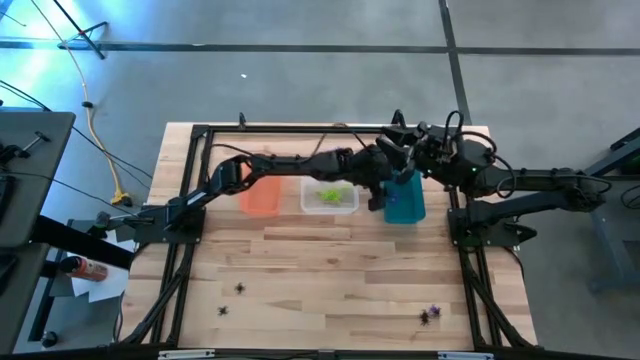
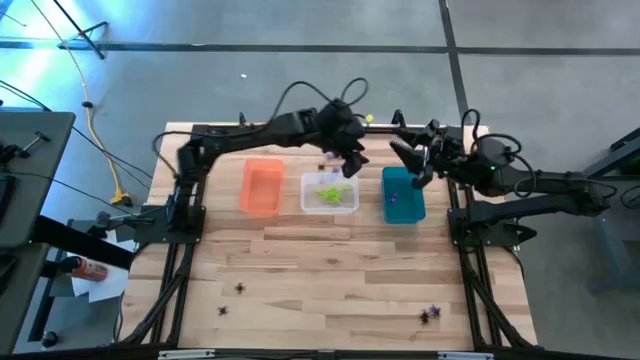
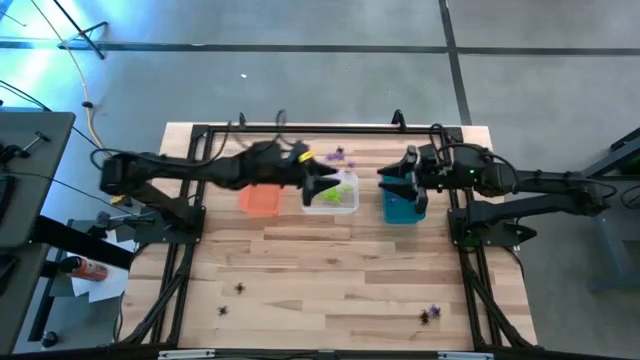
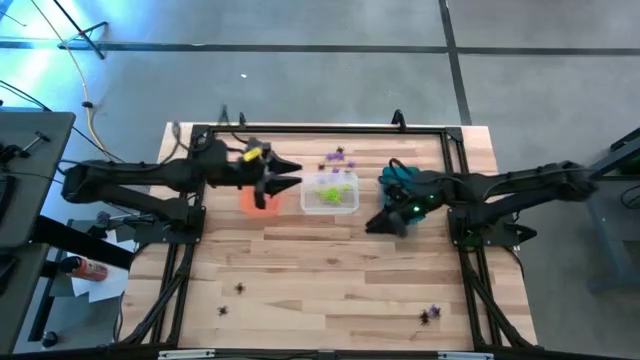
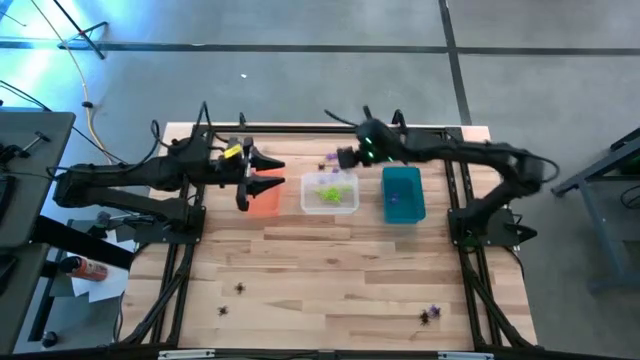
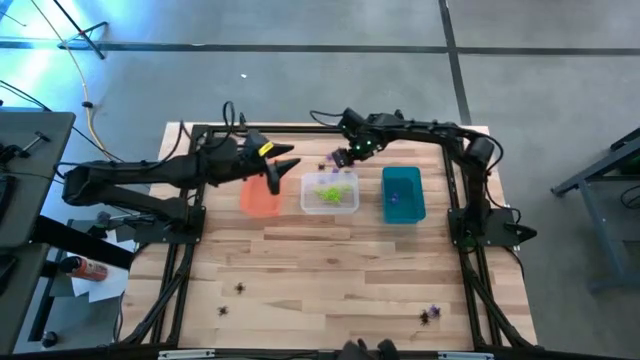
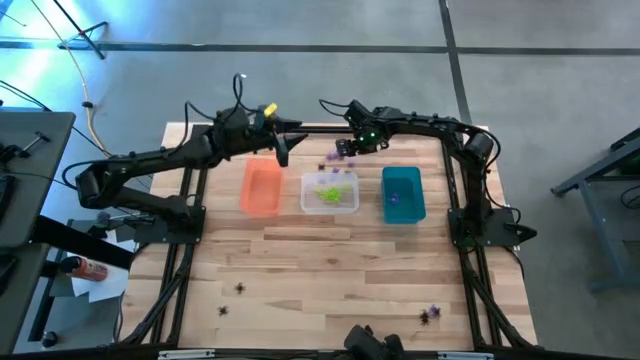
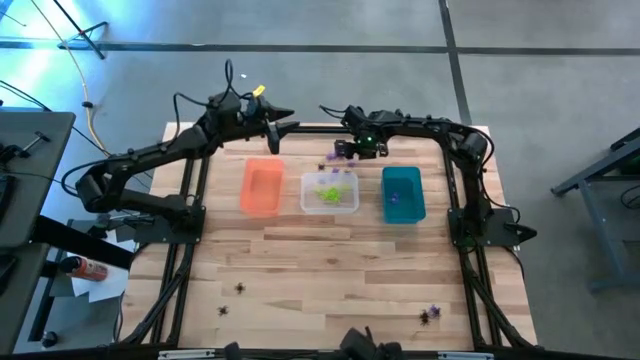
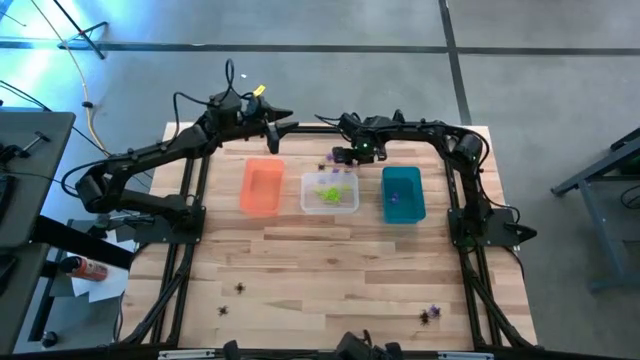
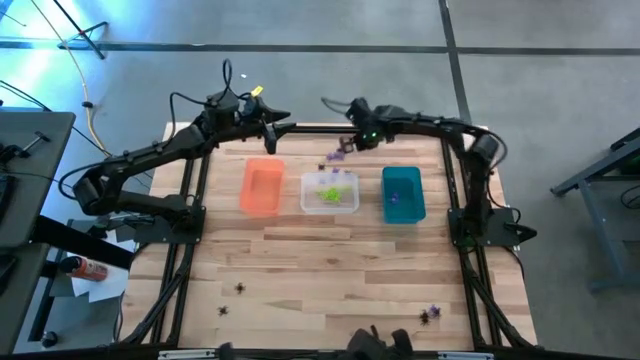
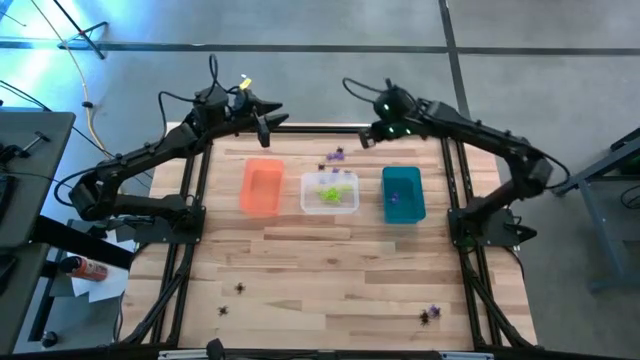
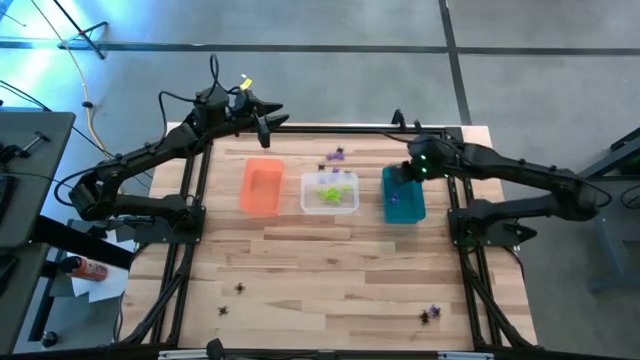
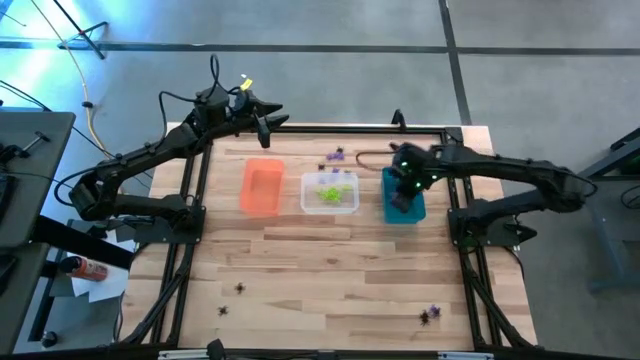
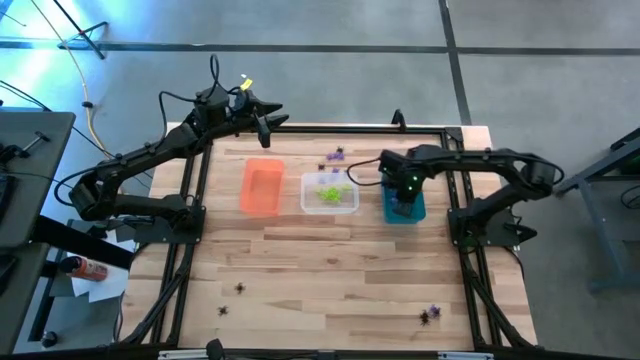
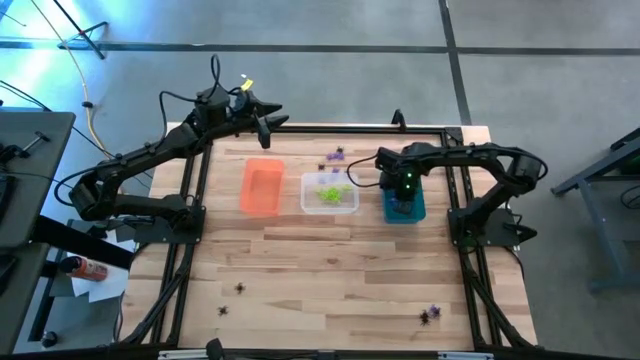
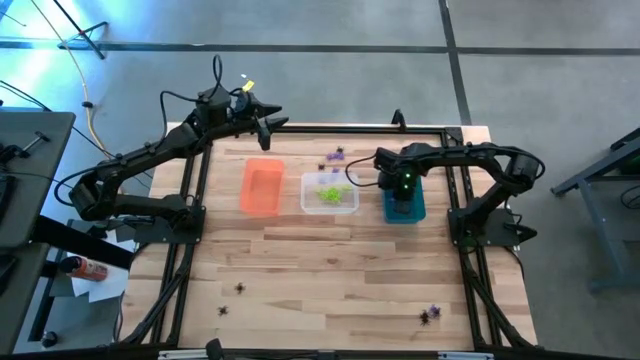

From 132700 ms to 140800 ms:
Task: Sort Halloween decoration
Put the purple spider toy into the blue bin

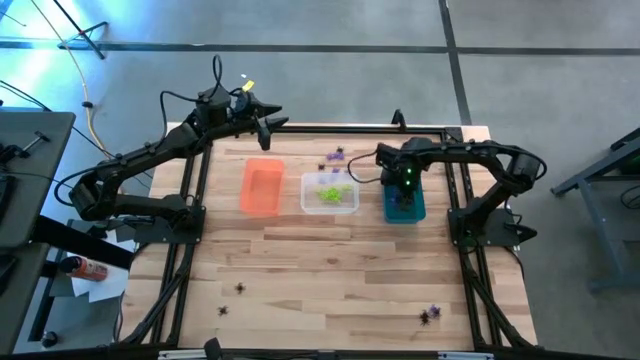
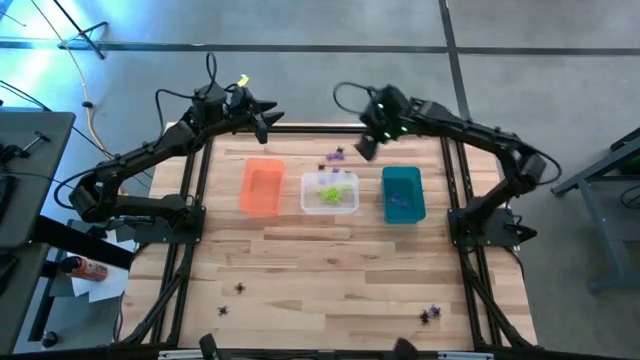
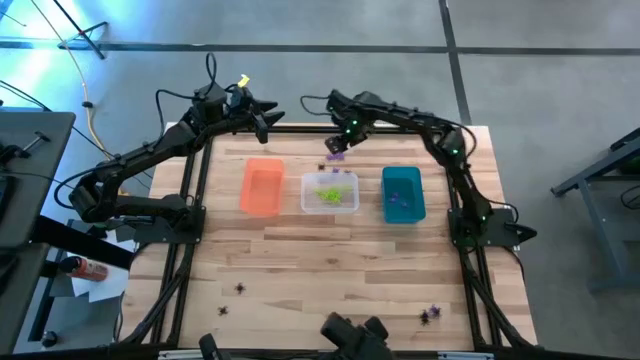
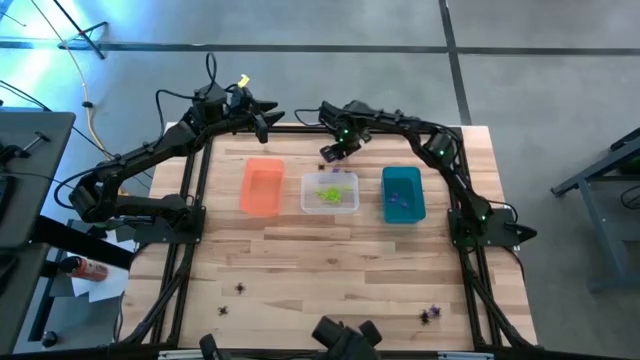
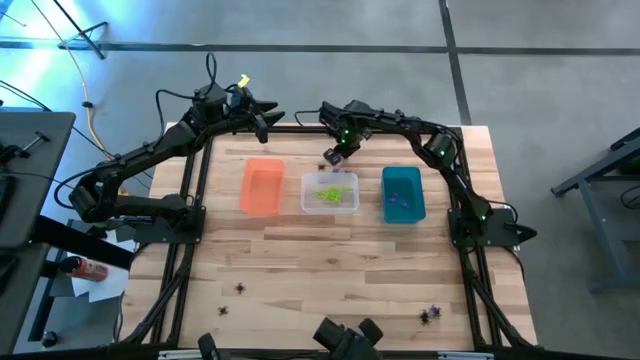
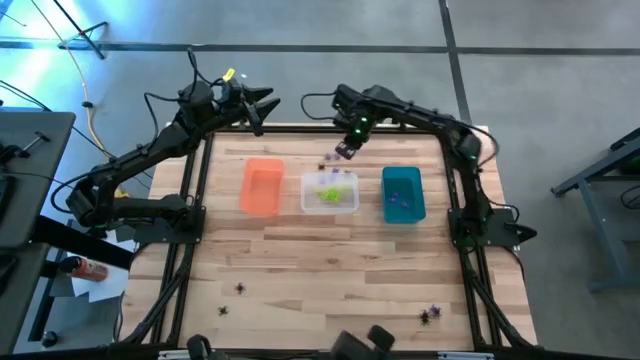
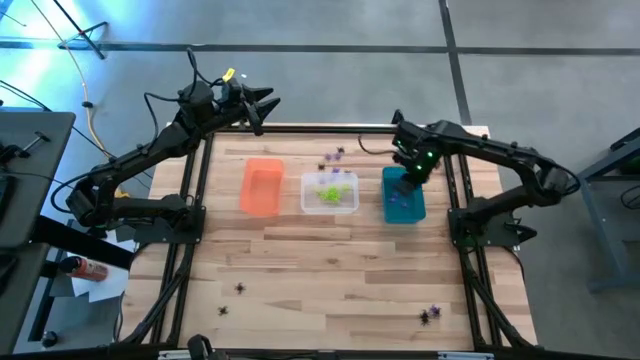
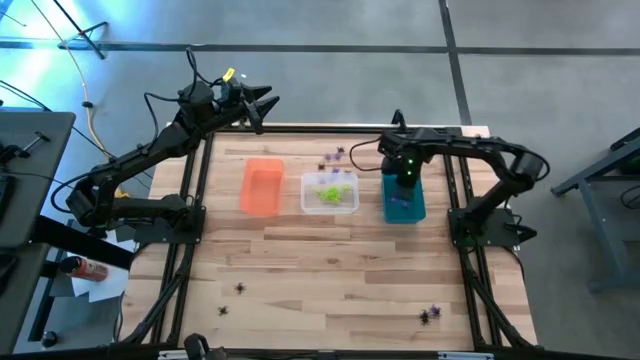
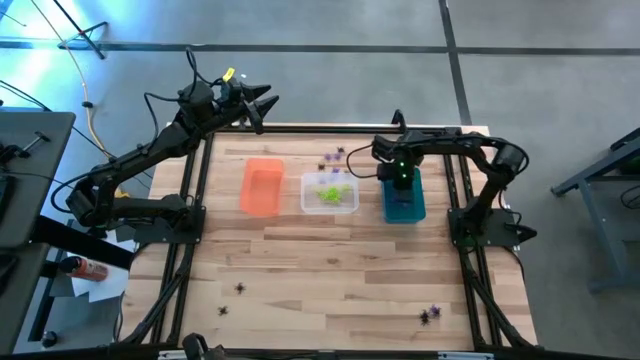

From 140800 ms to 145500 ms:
Put the purple spider toy into the blue bin

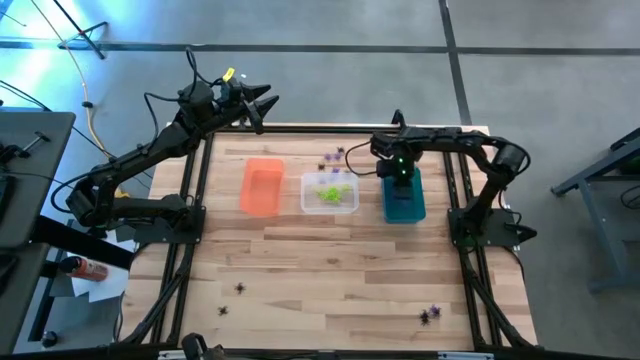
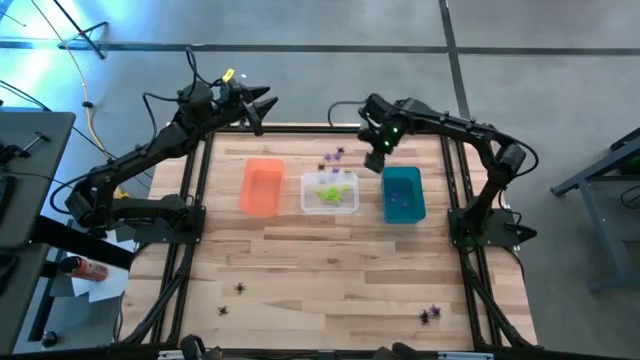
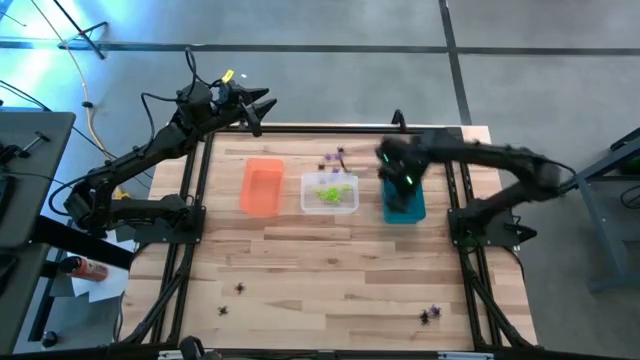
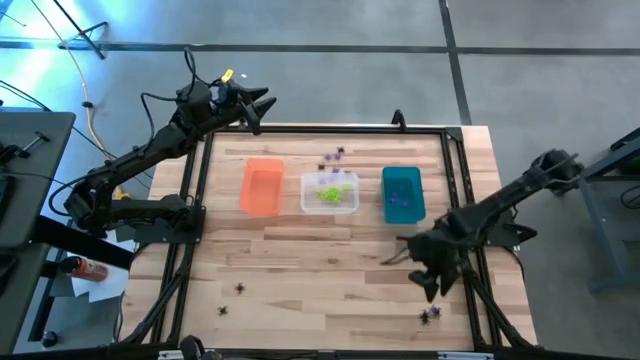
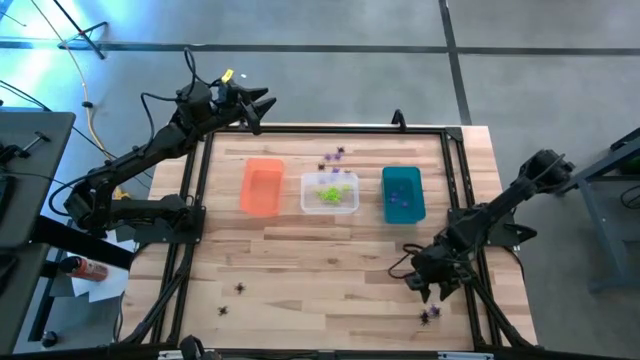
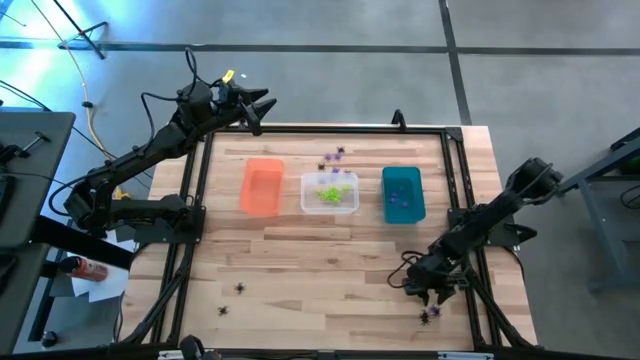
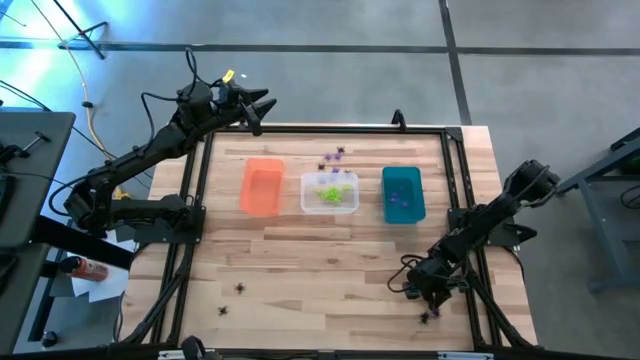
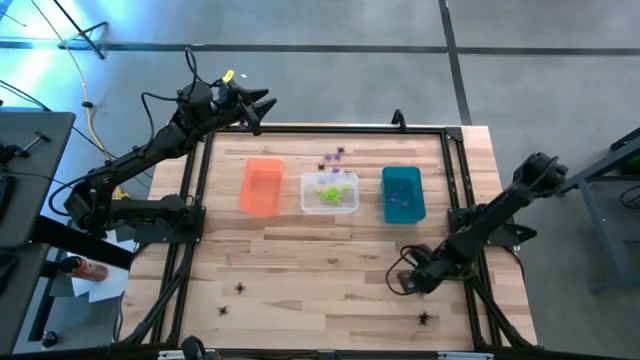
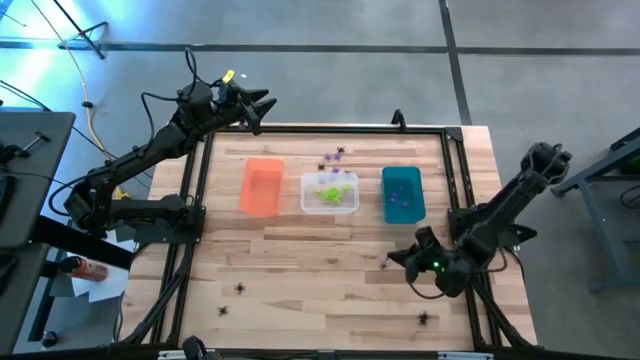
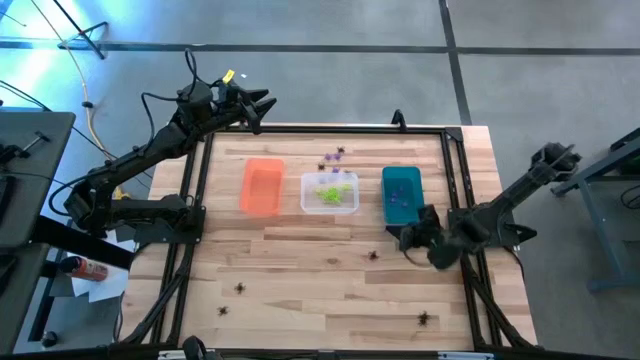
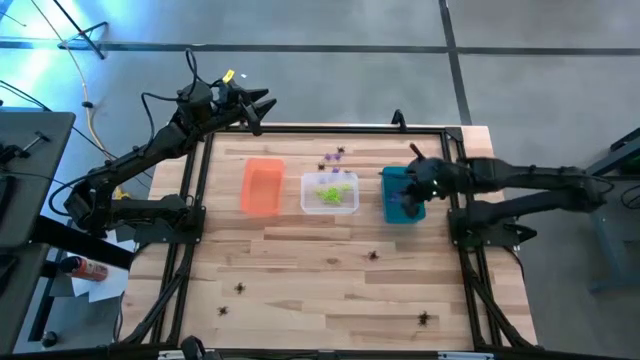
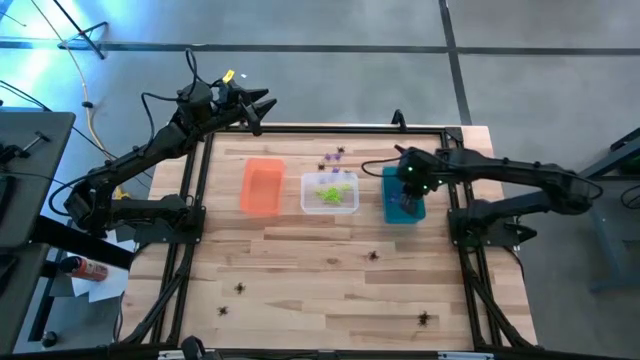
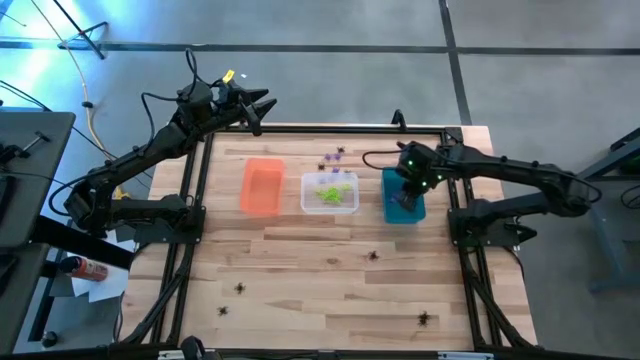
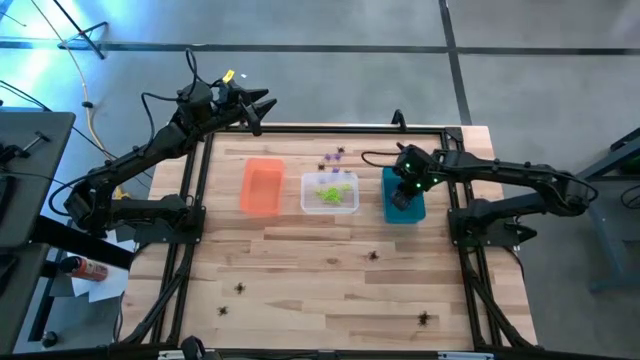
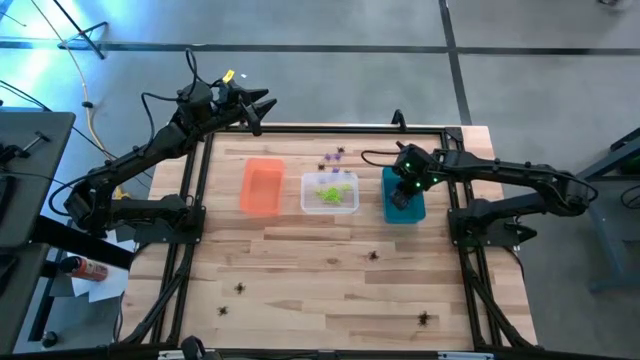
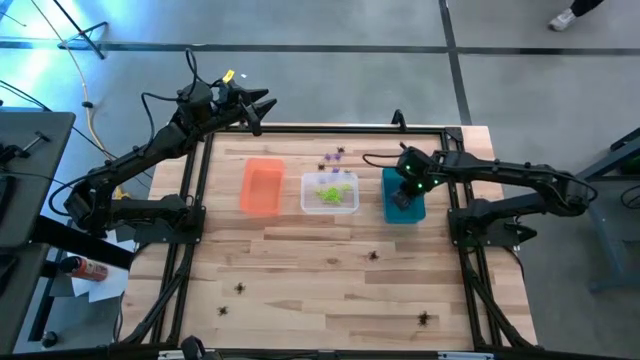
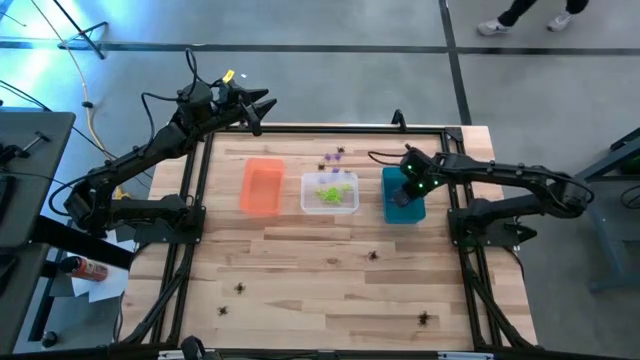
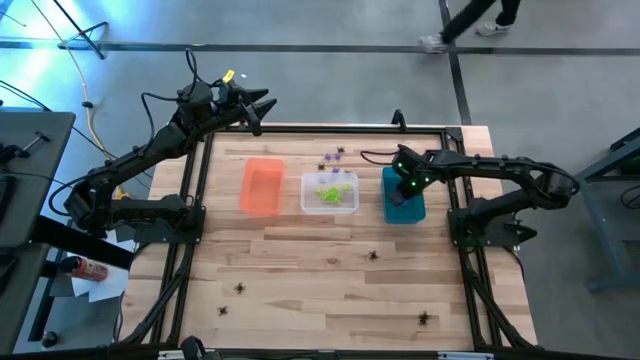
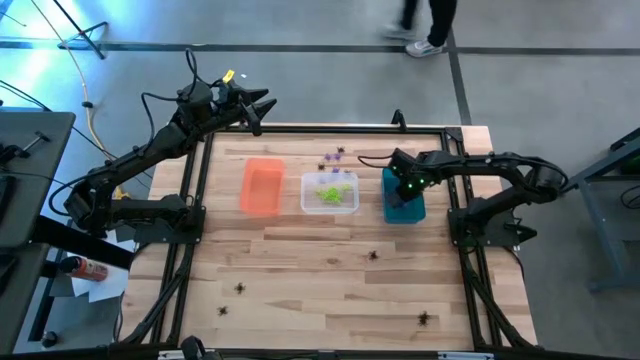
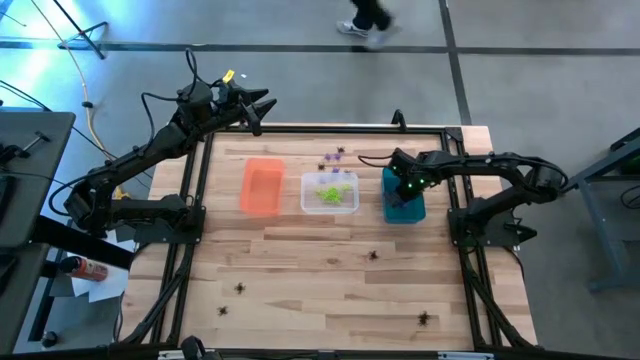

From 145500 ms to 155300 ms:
Put the purple spider toy into the blue bin
